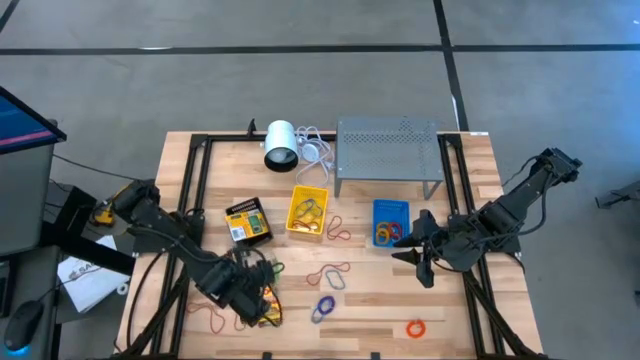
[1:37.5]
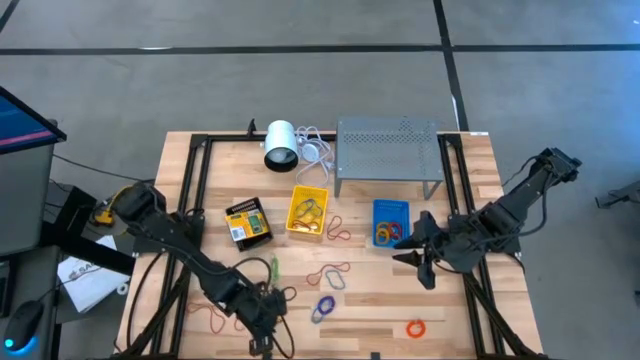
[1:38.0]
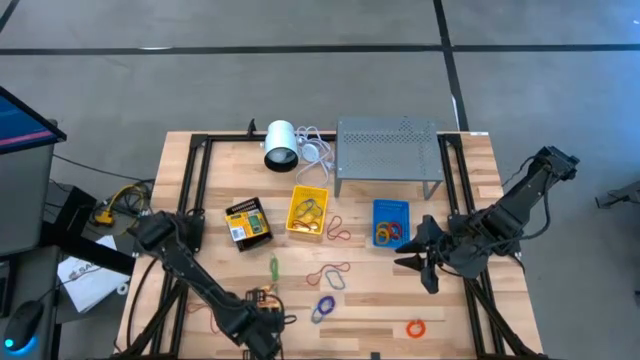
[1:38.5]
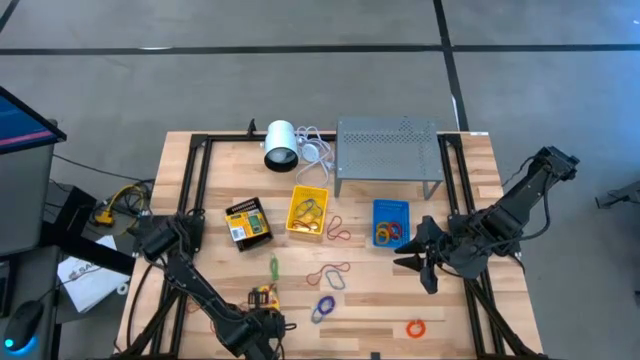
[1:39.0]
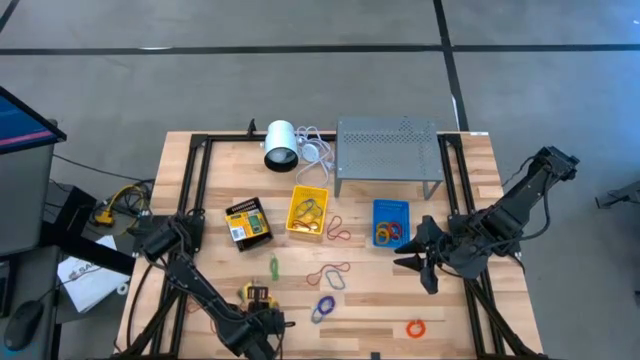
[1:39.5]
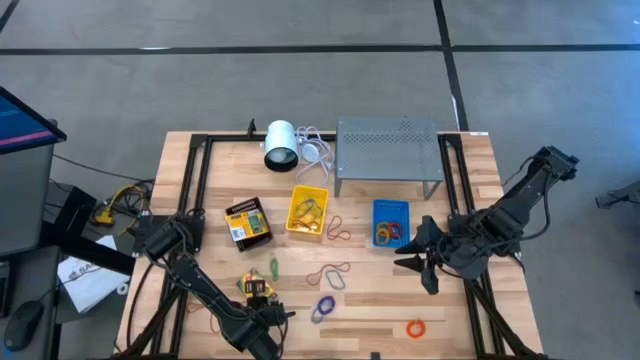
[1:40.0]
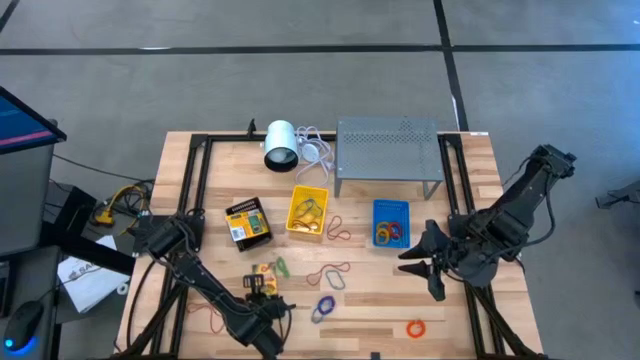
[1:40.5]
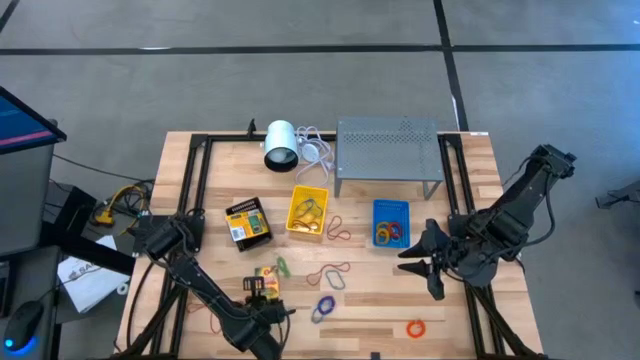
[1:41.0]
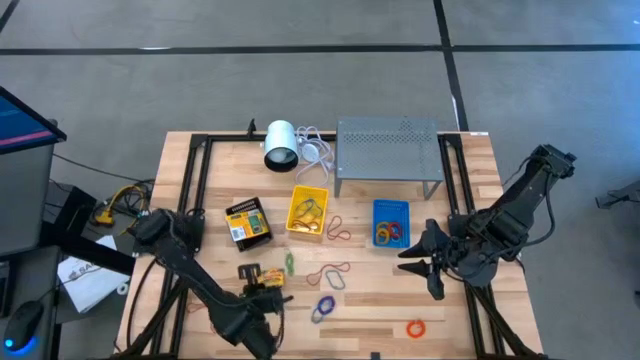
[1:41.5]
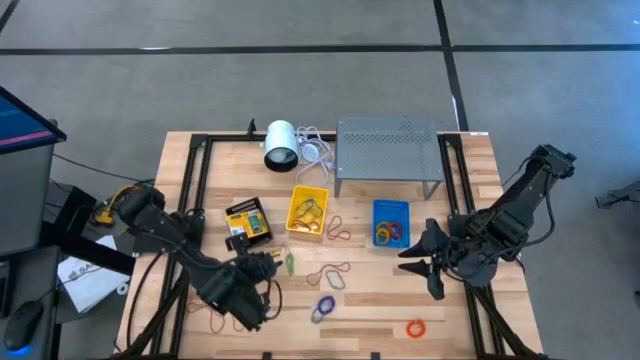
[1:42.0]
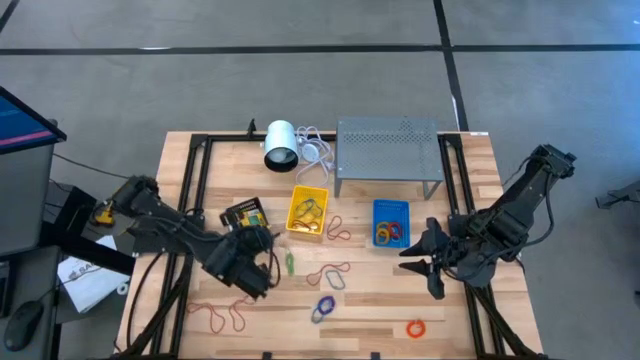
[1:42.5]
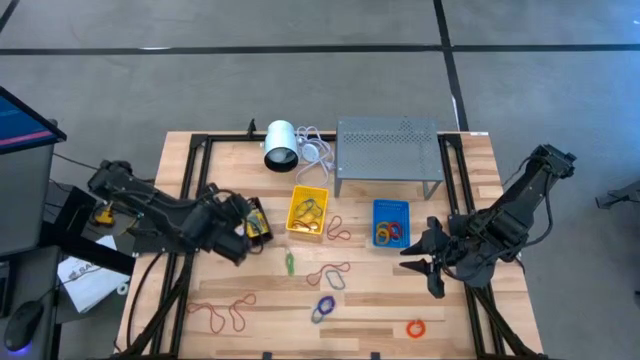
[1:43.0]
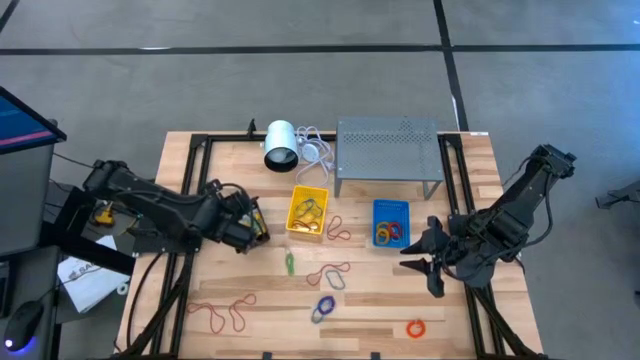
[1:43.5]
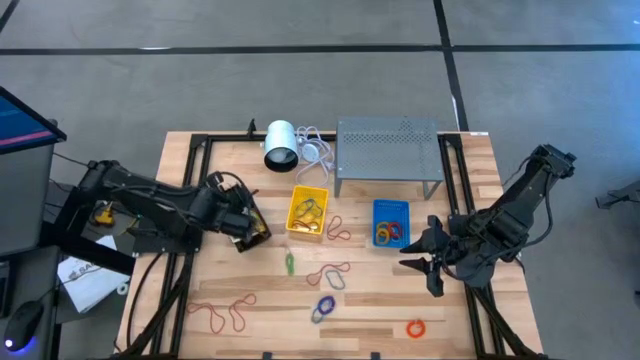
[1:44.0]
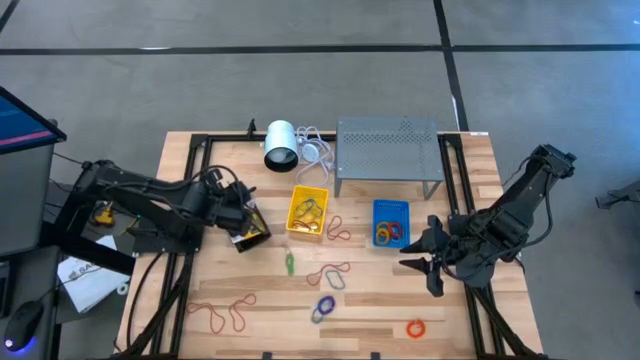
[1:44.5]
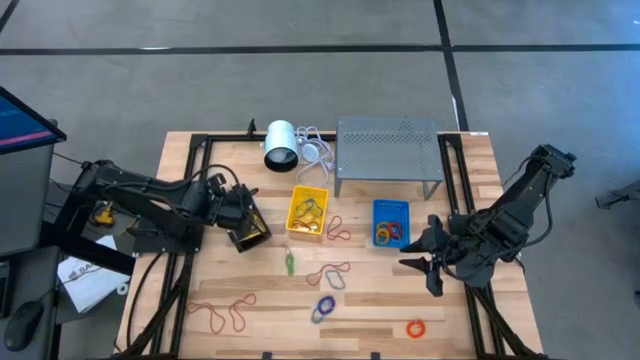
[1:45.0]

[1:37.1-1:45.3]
Task: Pick & Place Office Desk Supplies
Put the crayon box into the black basket

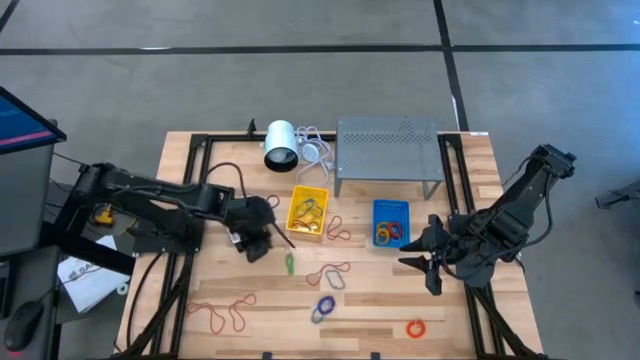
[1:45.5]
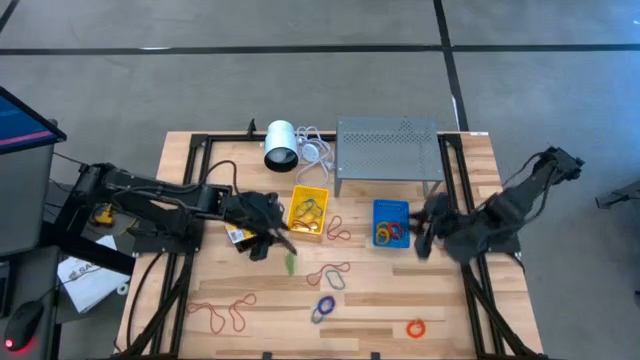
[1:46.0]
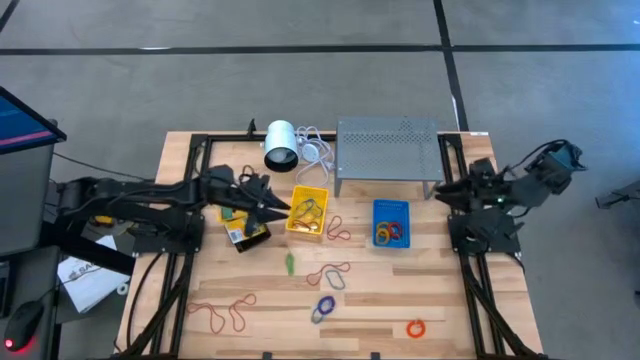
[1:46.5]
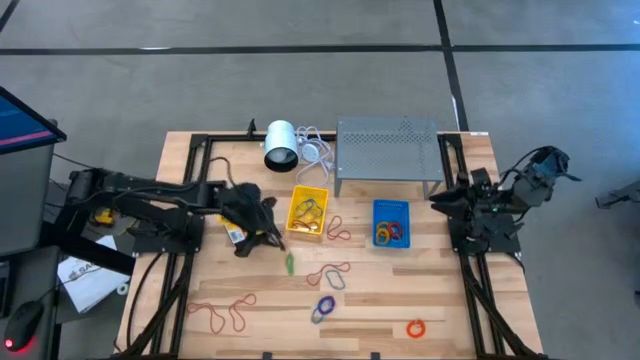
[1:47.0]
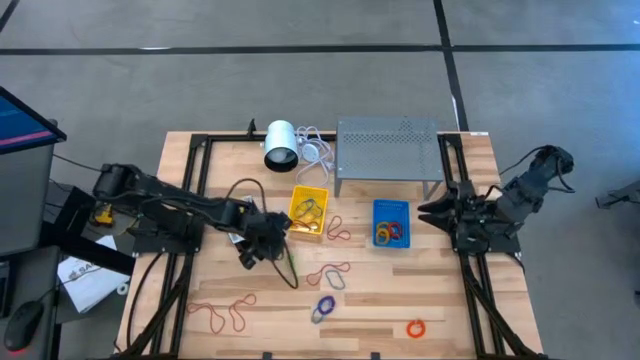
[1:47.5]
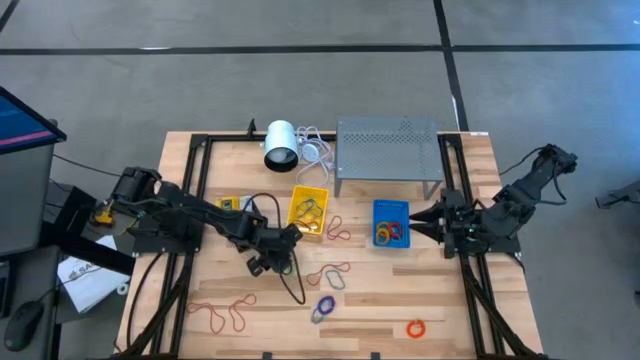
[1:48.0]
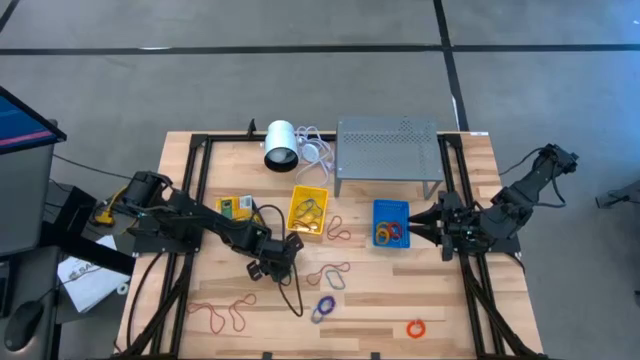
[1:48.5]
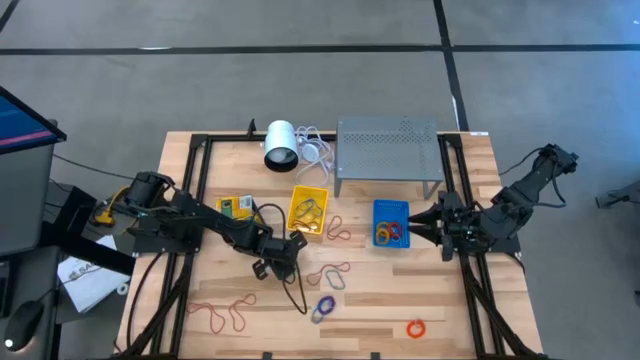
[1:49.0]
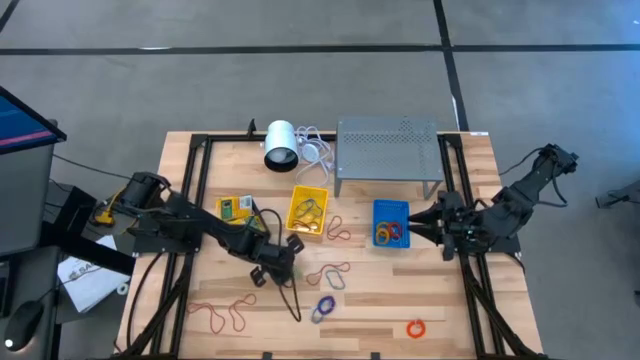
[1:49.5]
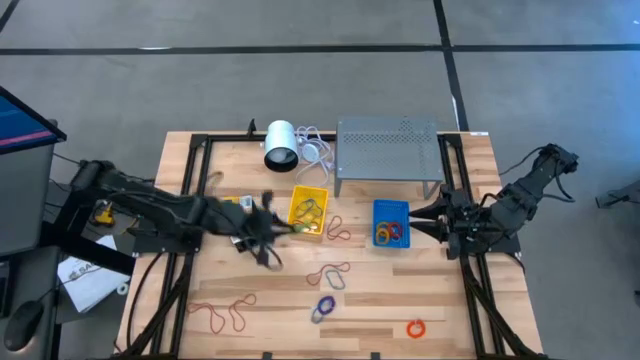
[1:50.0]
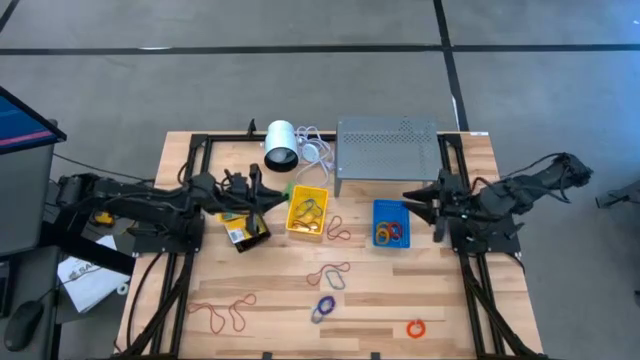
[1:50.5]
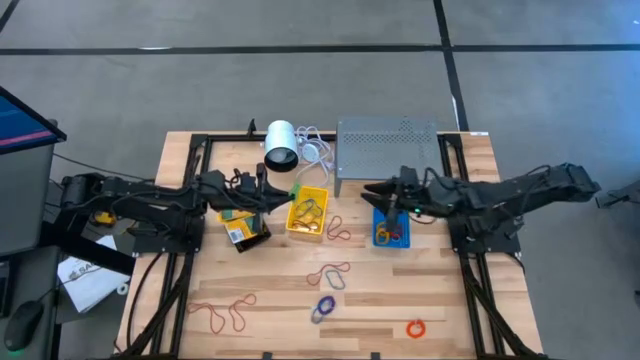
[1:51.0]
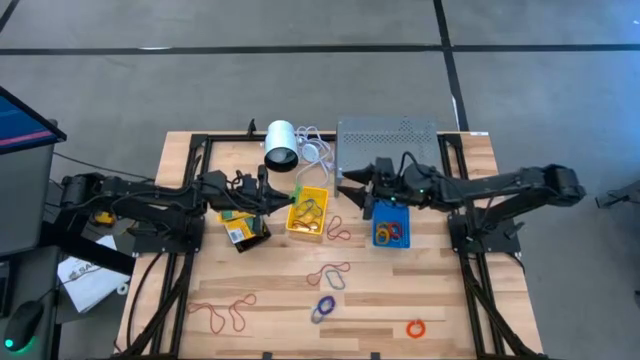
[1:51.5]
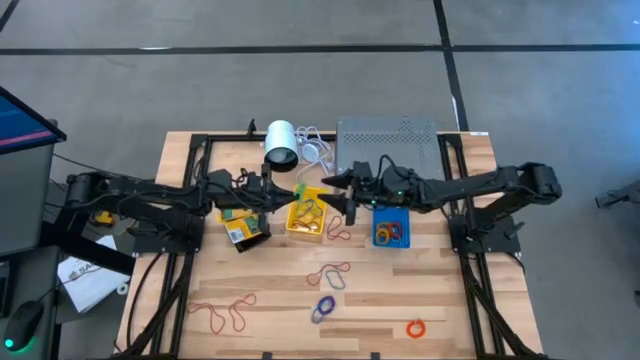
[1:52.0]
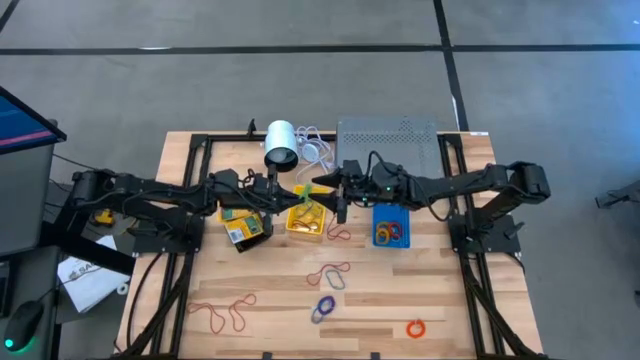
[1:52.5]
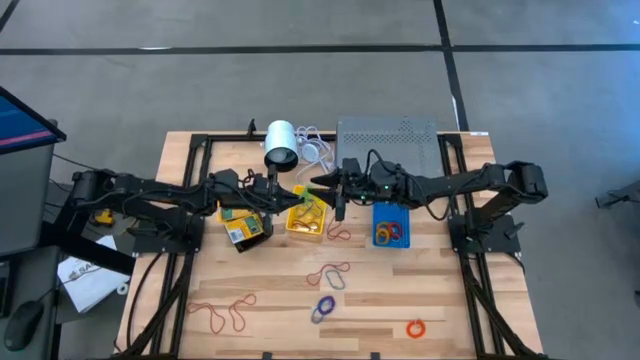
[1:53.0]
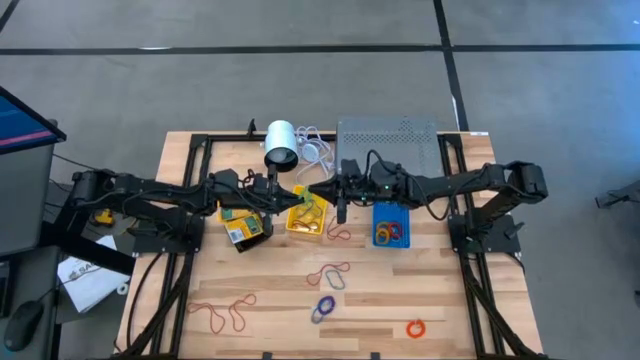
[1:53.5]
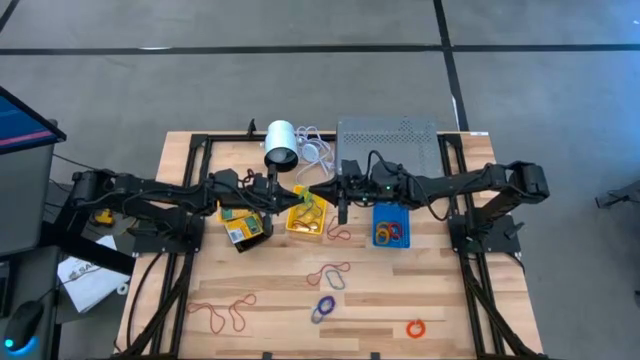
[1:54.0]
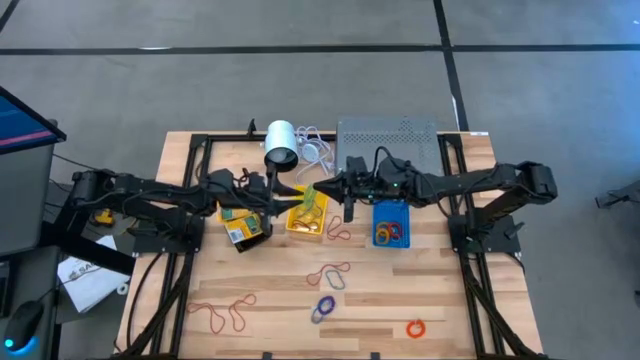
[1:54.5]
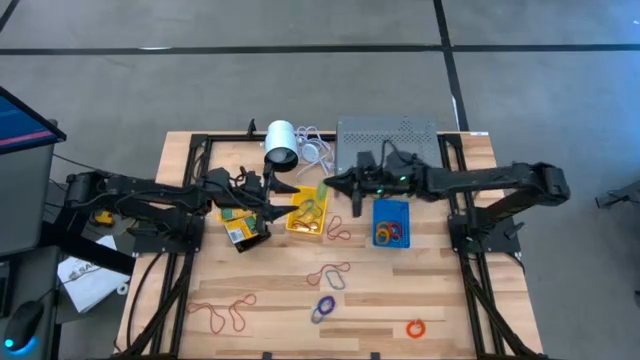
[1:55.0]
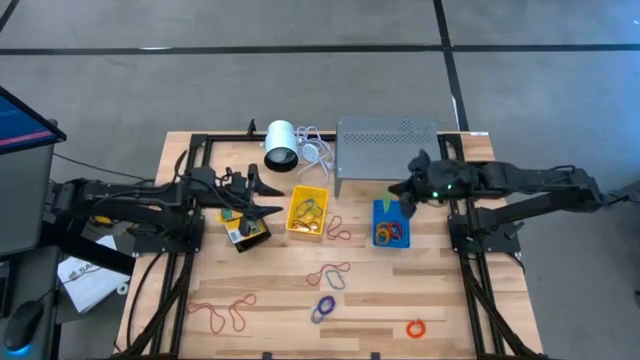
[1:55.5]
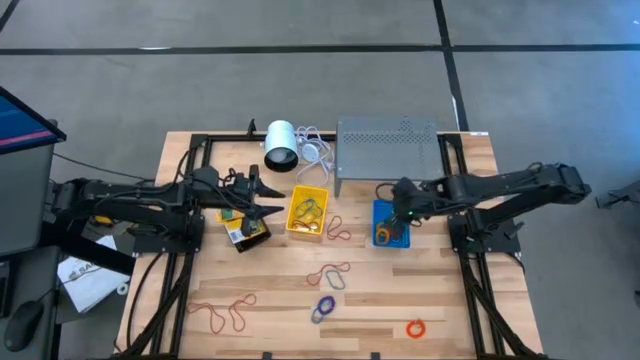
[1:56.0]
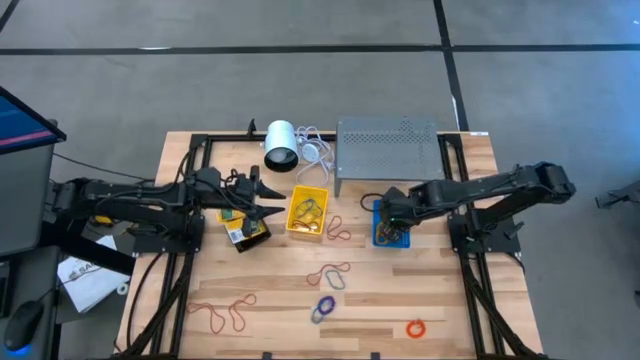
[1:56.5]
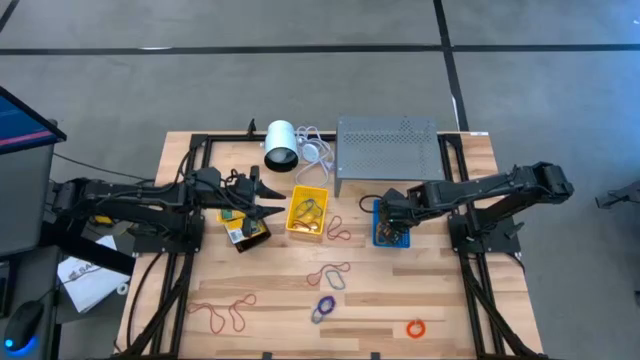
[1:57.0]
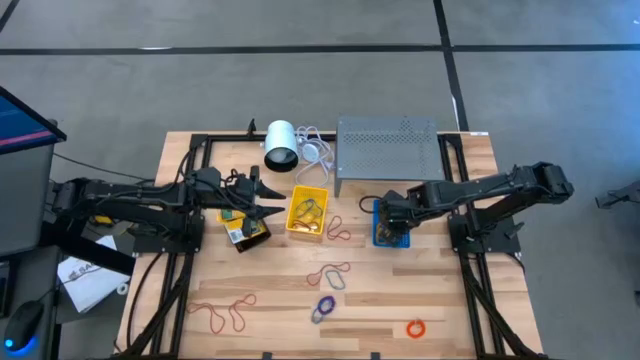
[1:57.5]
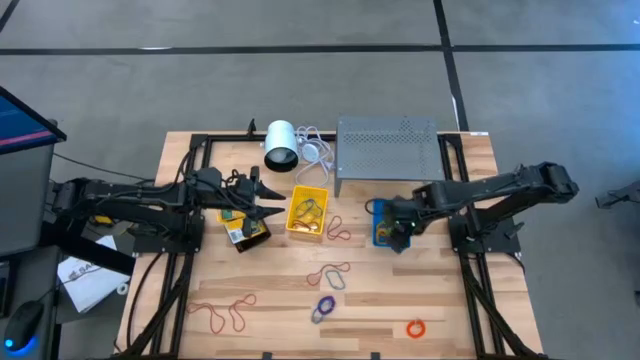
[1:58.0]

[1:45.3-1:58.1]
Put the green elastic key ring into the blue basket

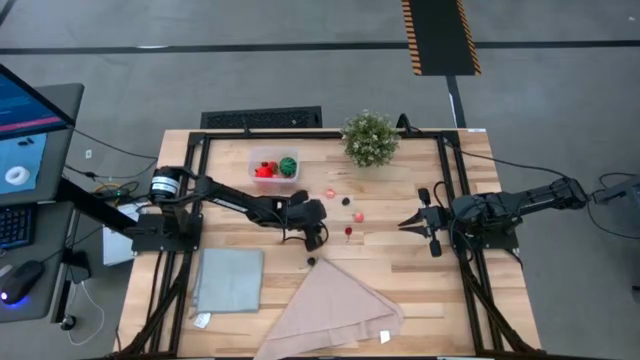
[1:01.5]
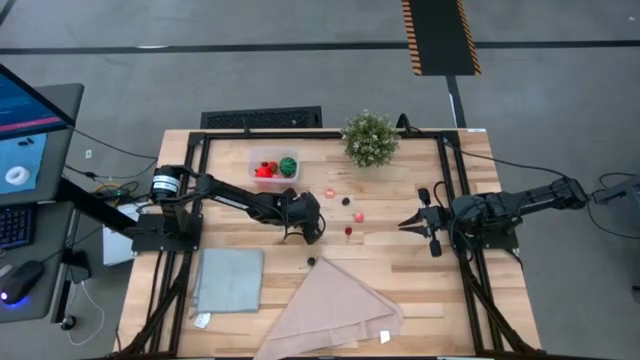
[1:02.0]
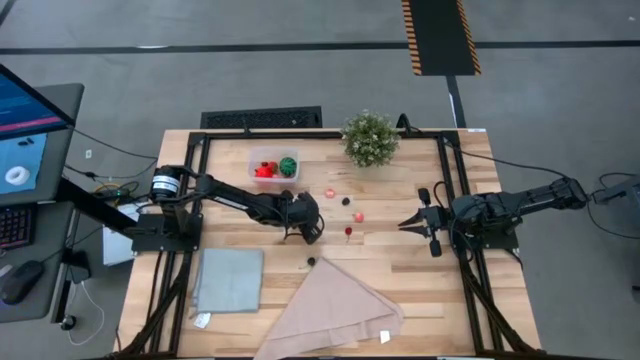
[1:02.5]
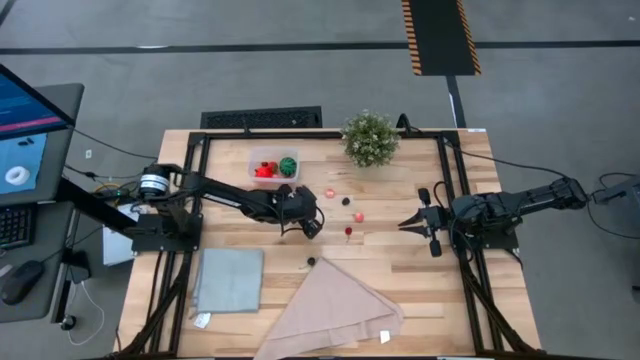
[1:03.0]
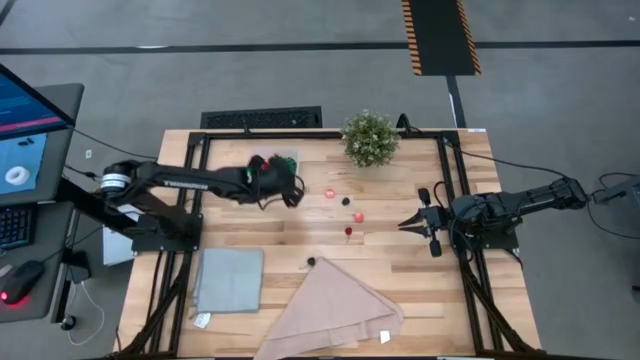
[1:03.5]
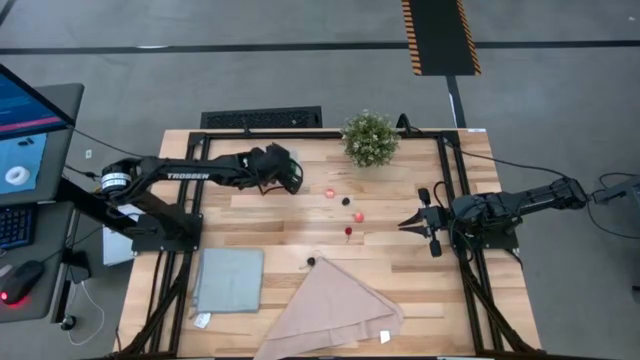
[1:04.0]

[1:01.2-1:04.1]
Task: Pick and placing Produce into tupperware
Put the red cherry into the transparent container
